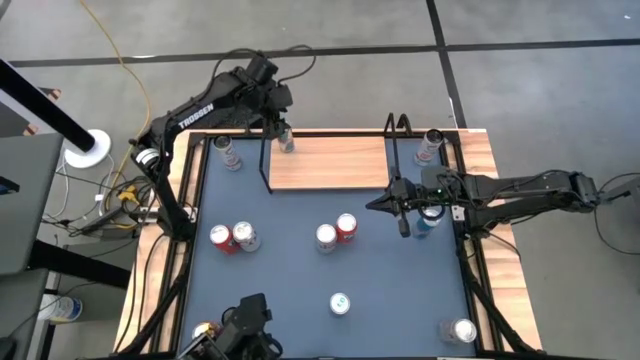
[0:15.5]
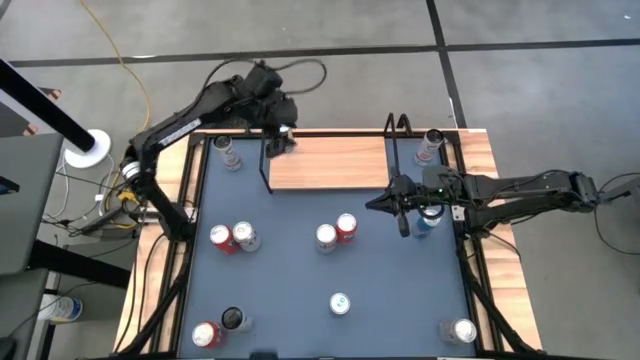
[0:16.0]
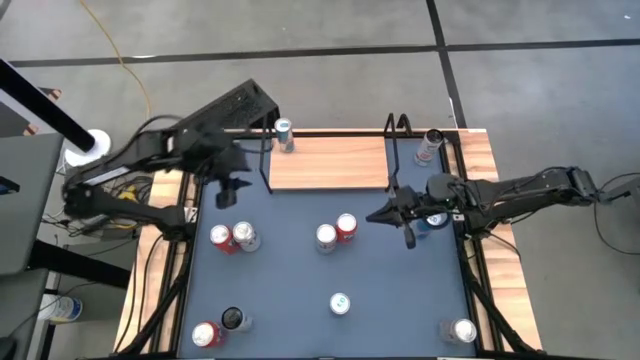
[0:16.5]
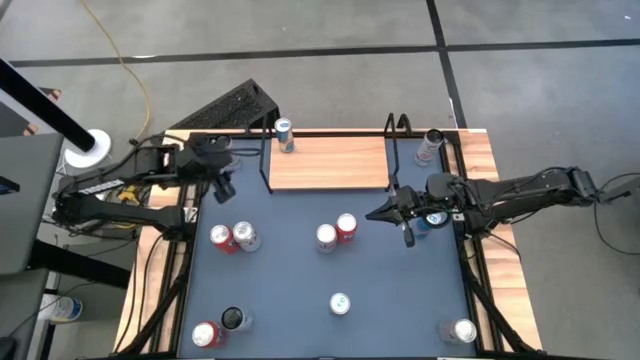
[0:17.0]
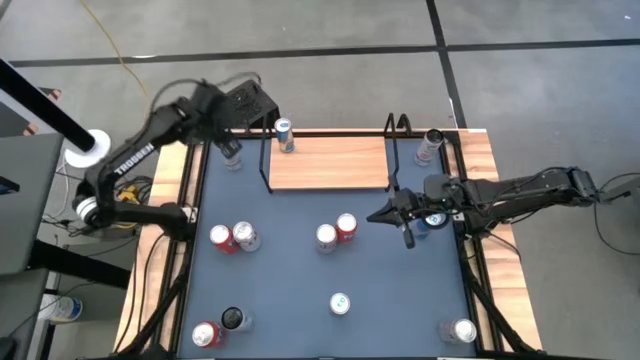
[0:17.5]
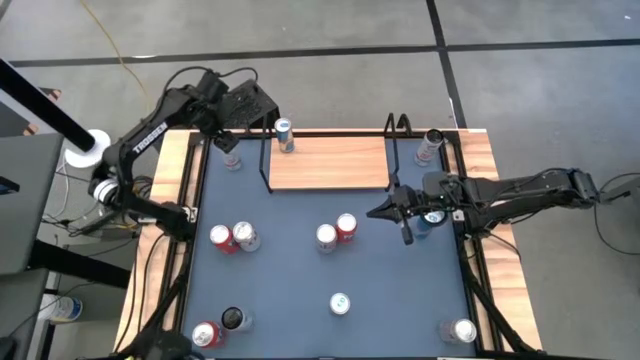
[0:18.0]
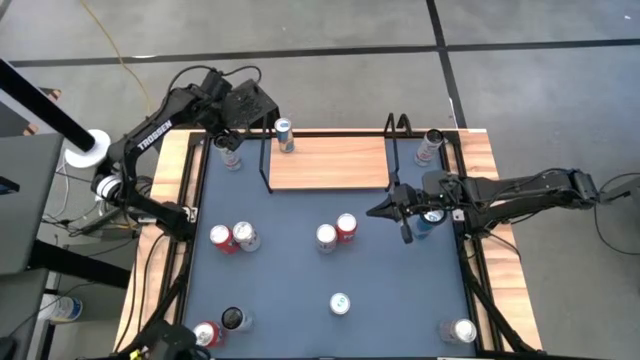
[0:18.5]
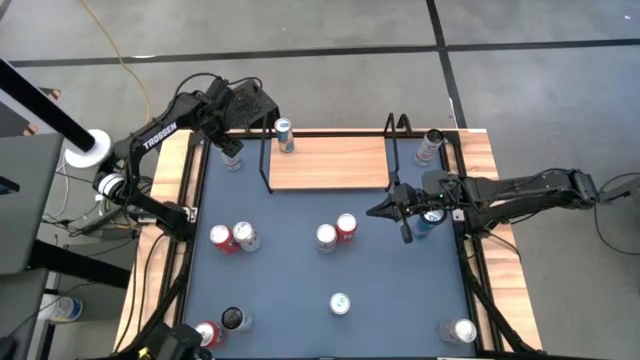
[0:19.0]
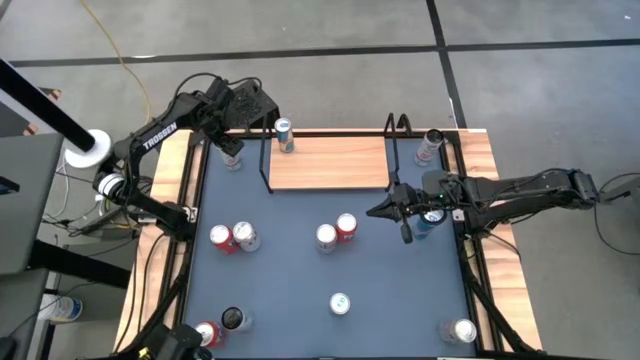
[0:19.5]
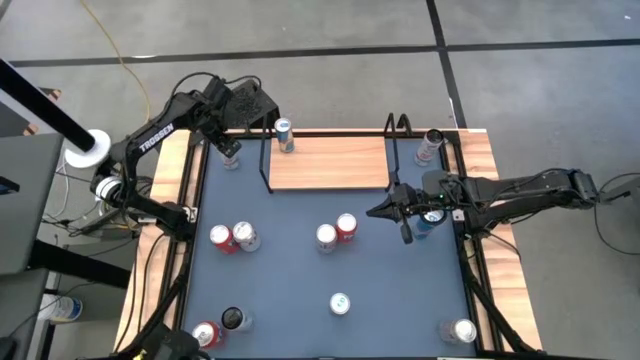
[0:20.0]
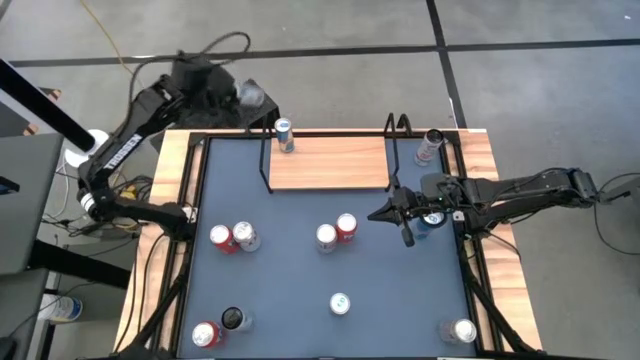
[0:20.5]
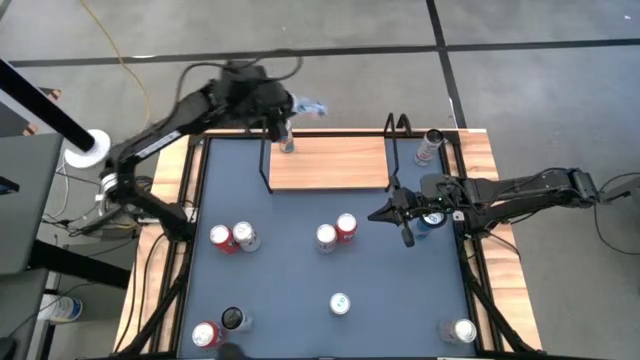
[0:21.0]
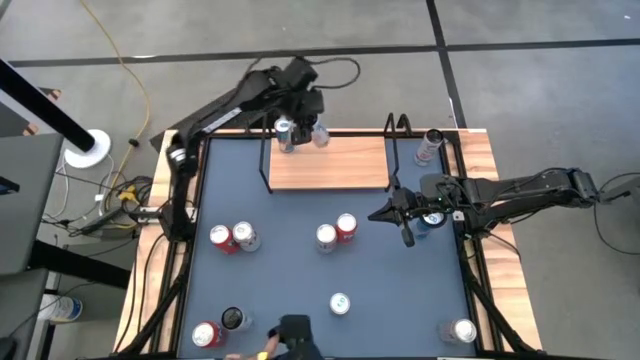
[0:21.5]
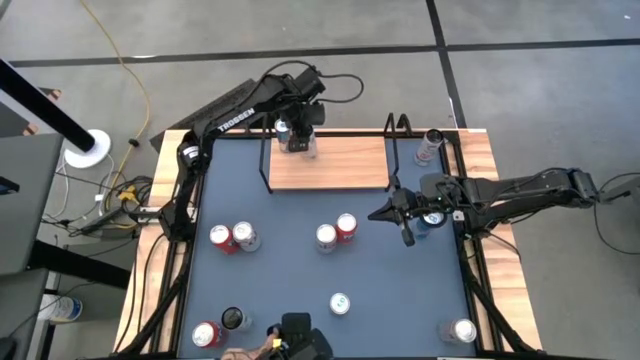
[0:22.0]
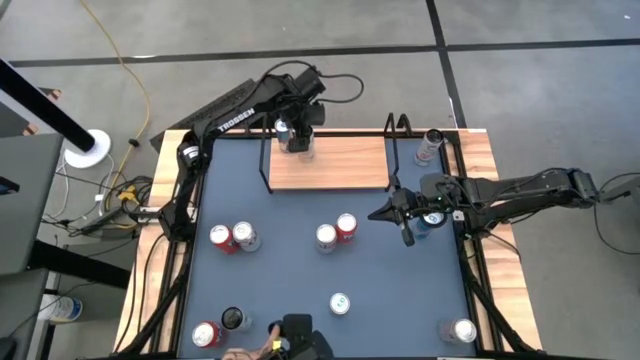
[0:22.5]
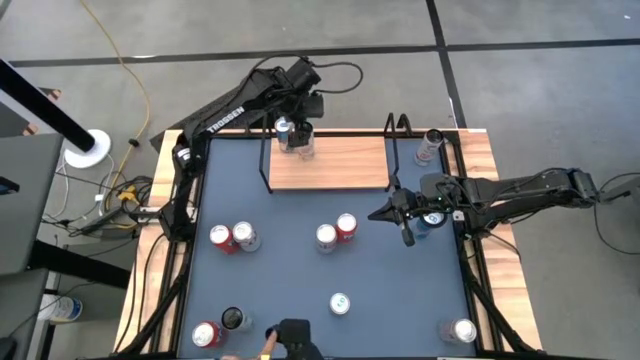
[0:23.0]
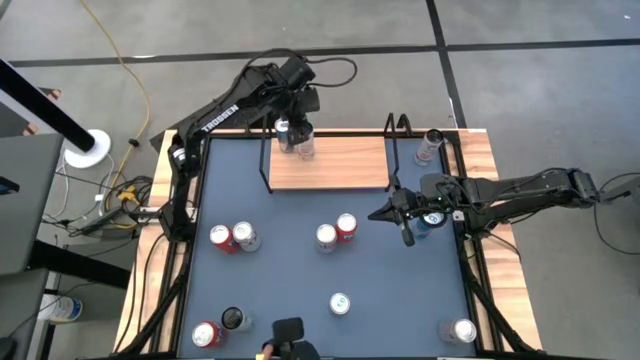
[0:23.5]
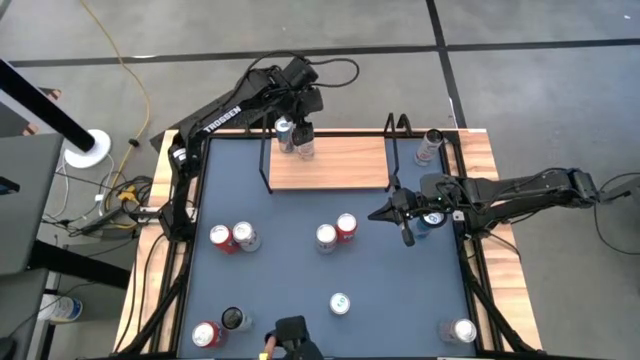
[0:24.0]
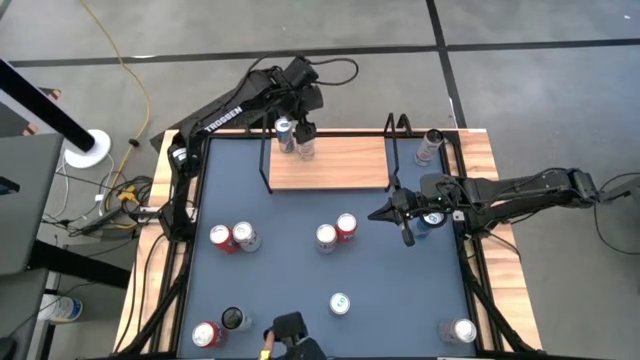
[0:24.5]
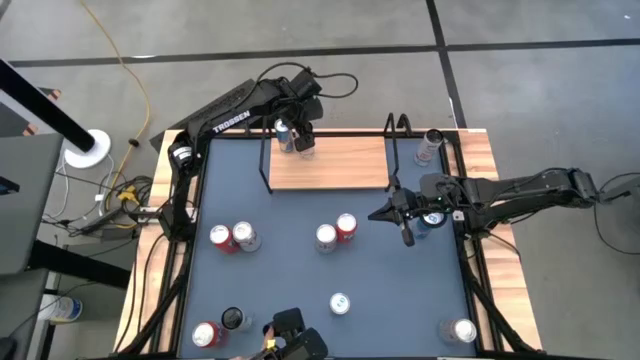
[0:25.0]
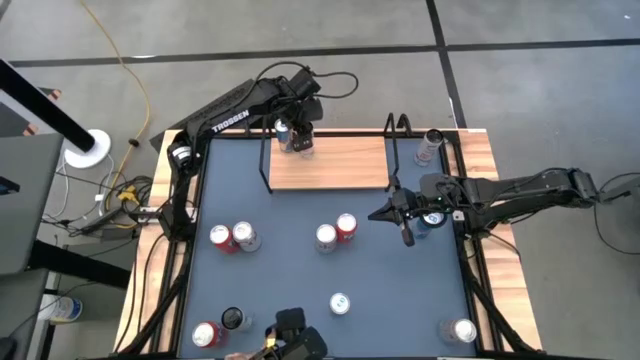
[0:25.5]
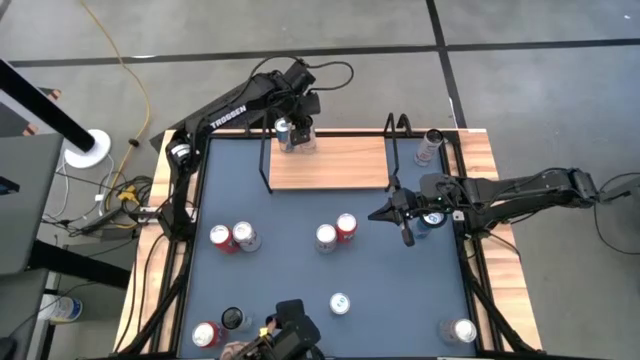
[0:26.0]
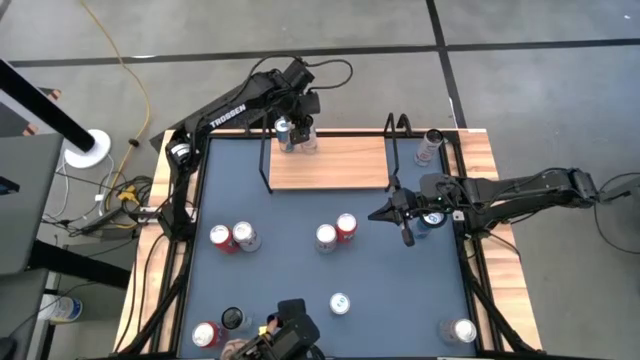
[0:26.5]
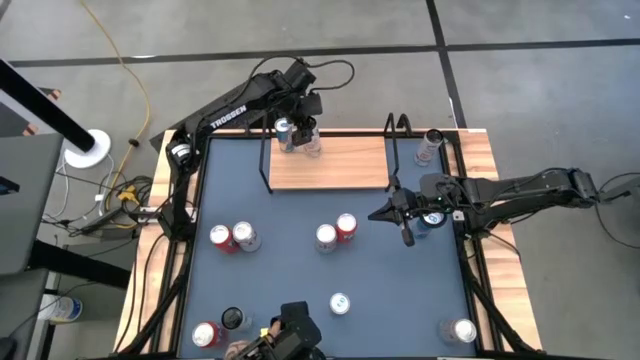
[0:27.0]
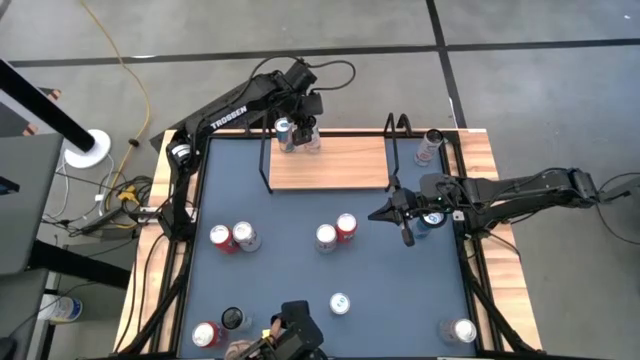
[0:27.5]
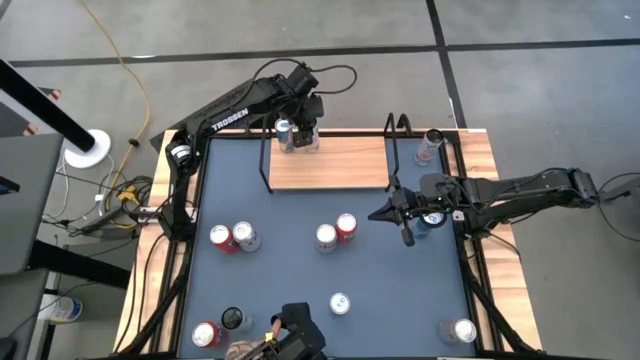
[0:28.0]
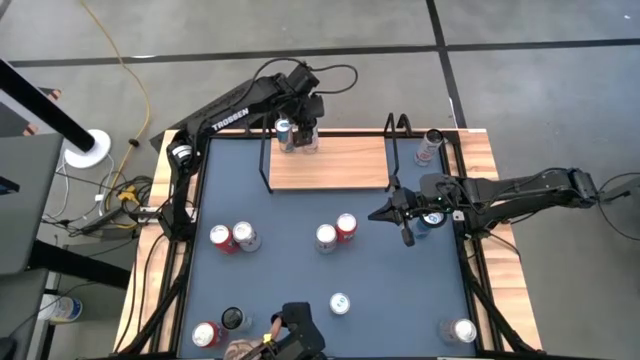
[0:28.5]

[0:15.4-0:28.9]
Task: Place canned beverage on shelf
Put the top left white-pink soda can on the shelf

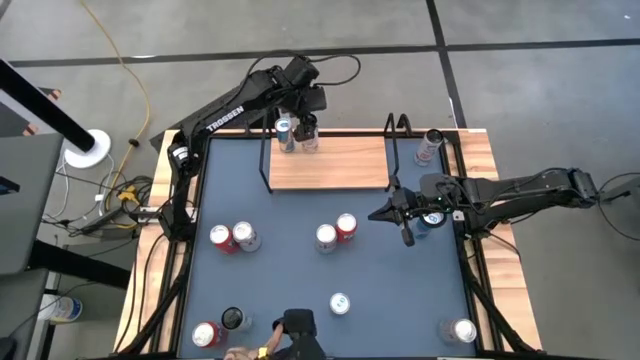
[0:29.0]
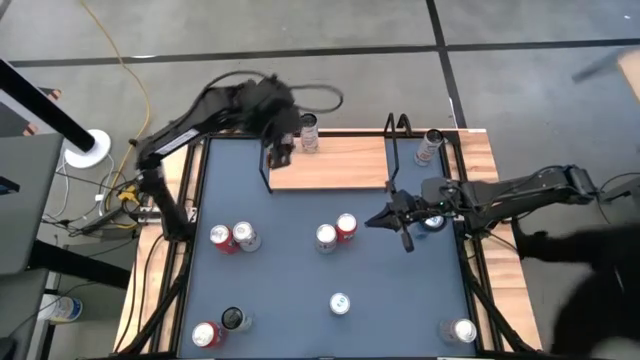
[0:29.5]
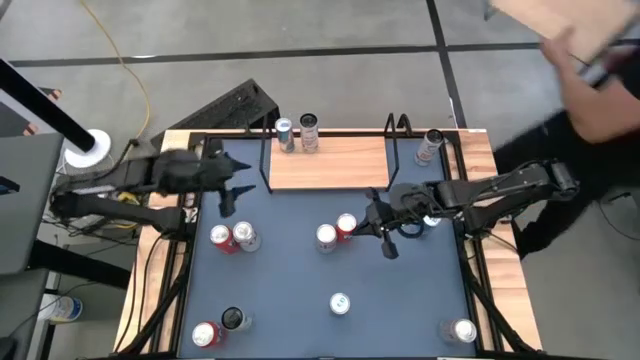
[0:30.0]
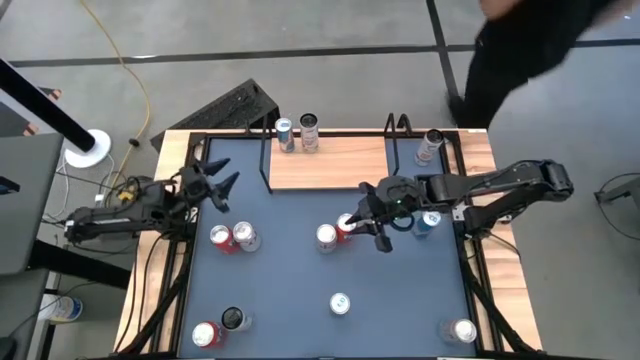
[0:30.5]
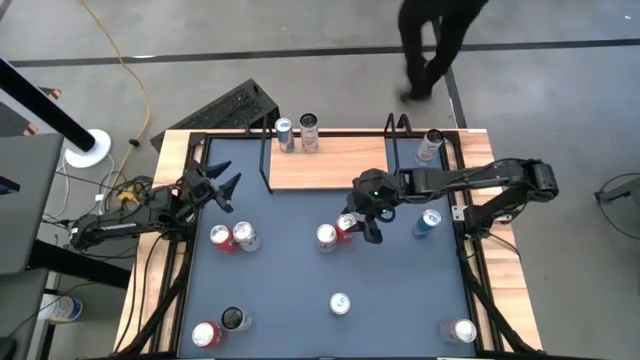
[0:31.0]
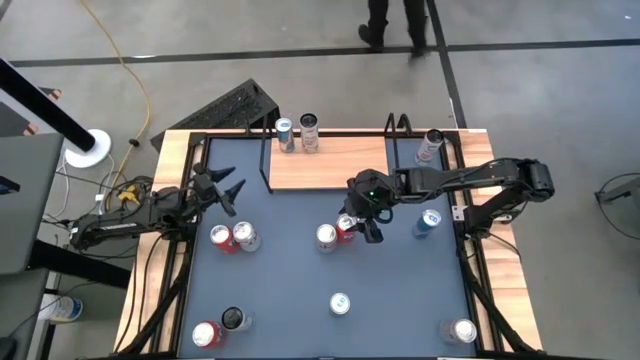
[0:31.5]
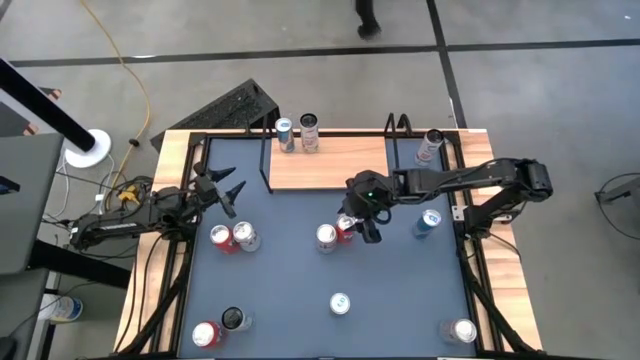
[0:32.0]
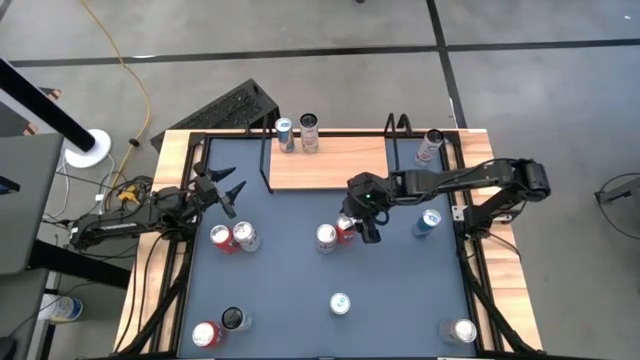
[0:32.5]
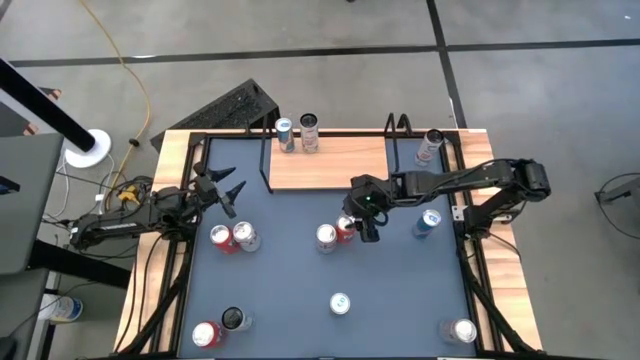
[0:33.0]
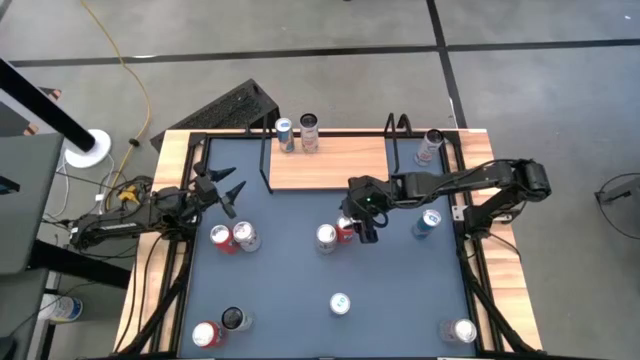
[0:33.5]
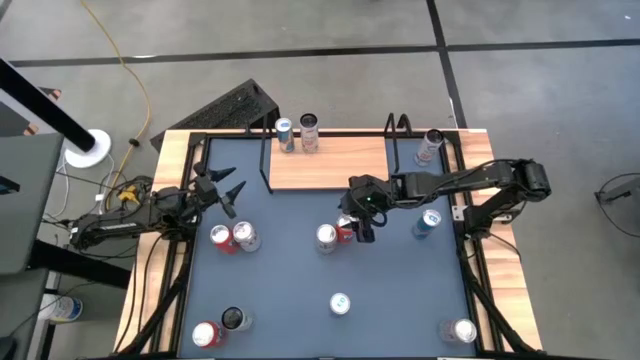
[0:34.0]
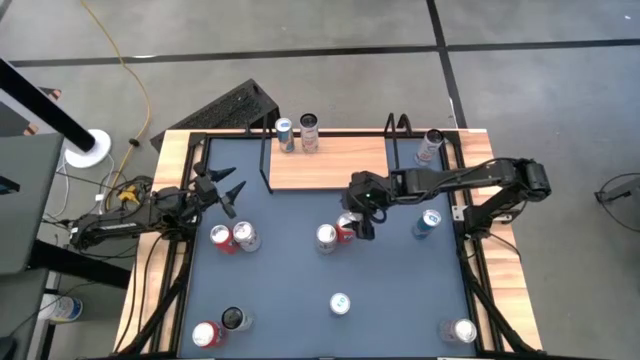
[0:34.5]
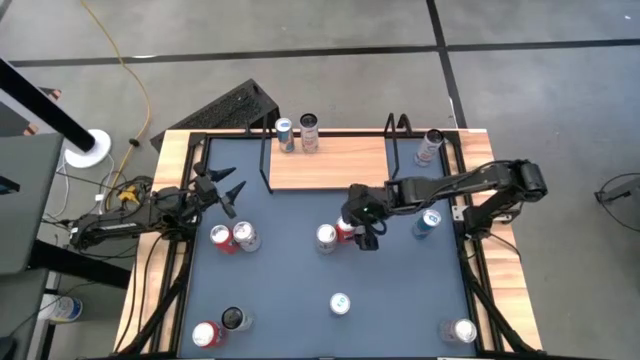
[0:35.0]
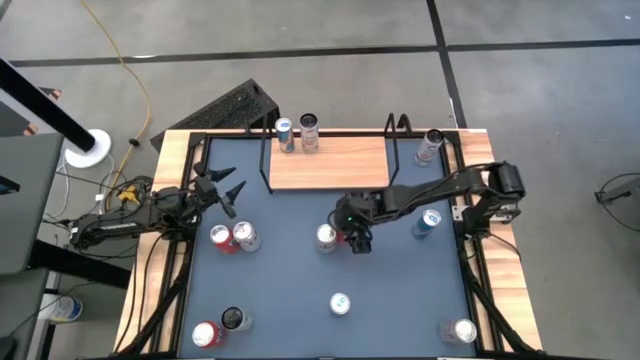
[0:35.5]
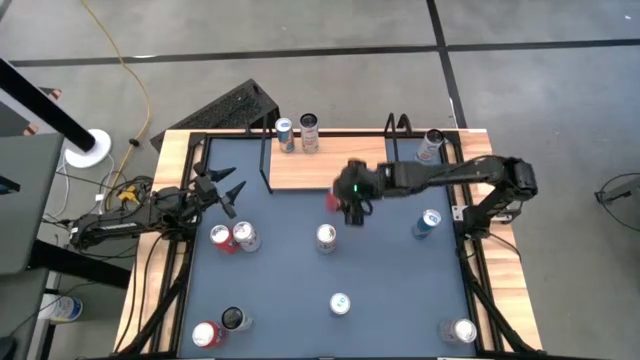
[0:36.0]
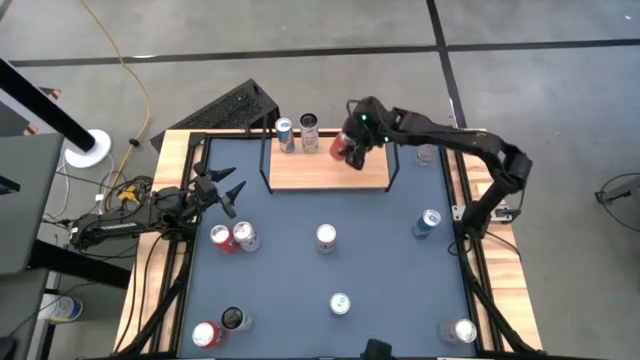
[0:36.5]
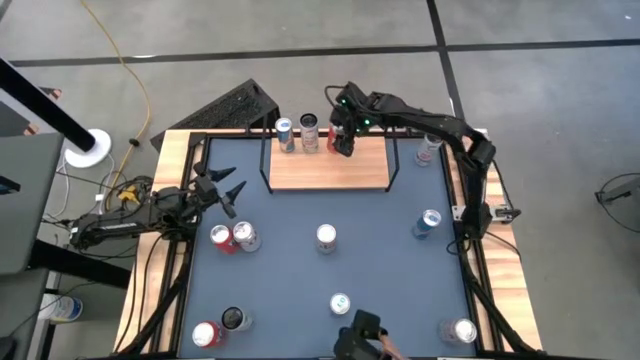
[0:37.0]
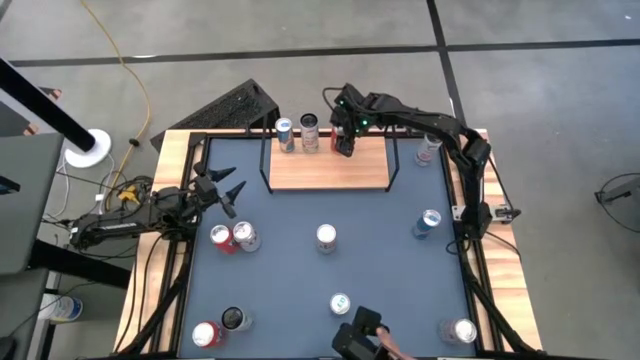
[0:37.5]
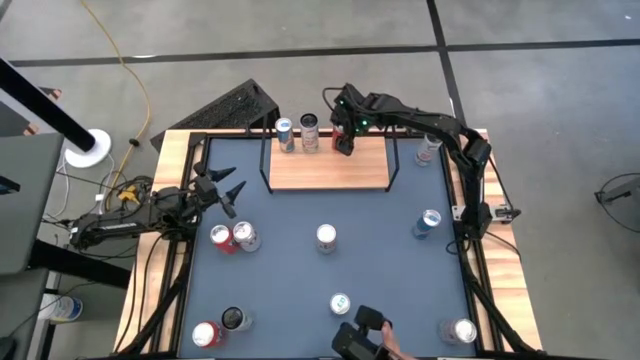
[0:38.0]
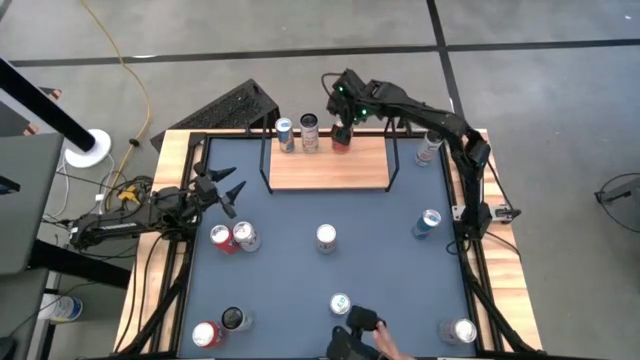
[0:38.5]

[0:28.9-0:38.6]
Put the top right orange soda can on the shelf
